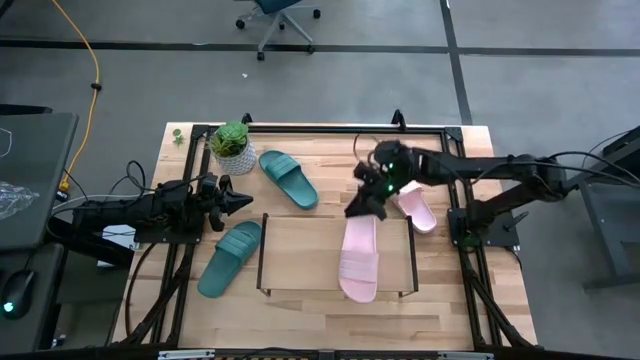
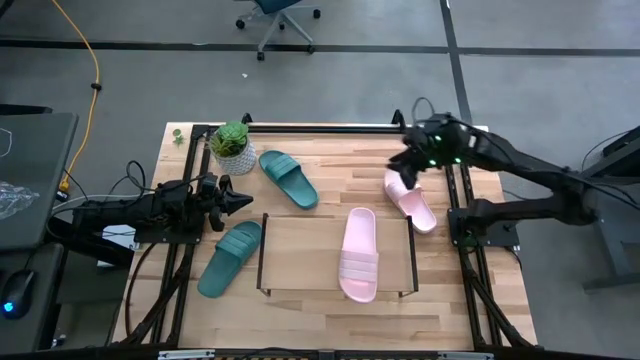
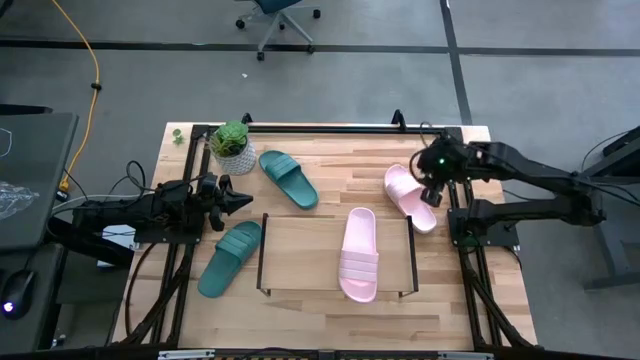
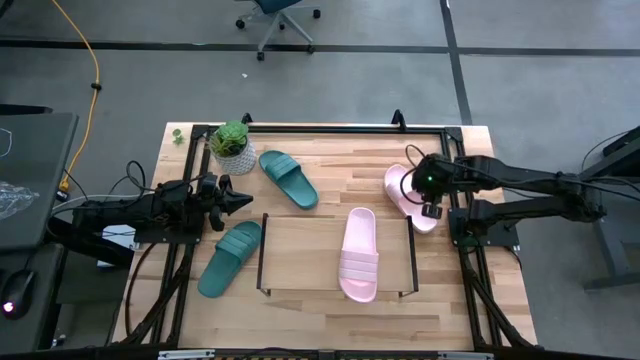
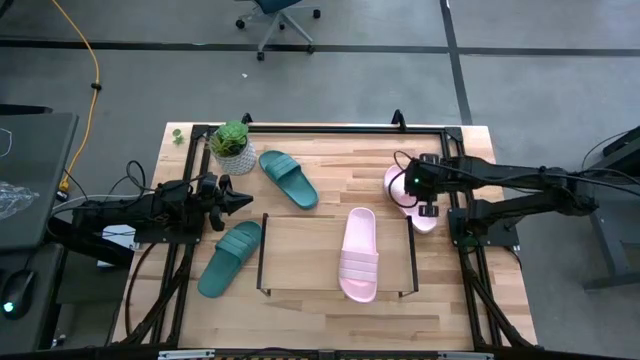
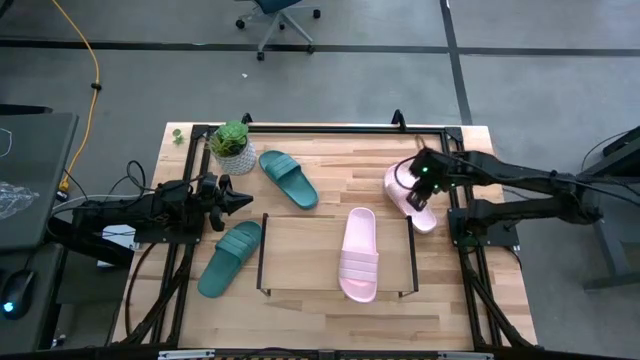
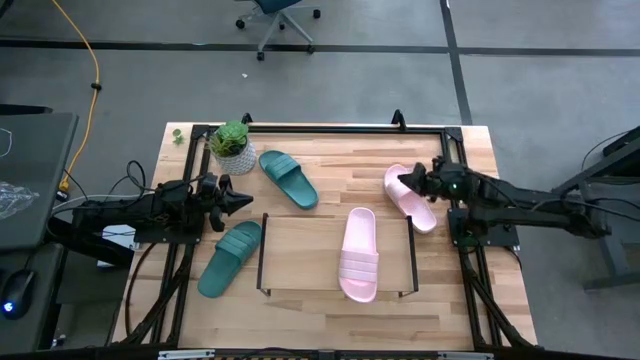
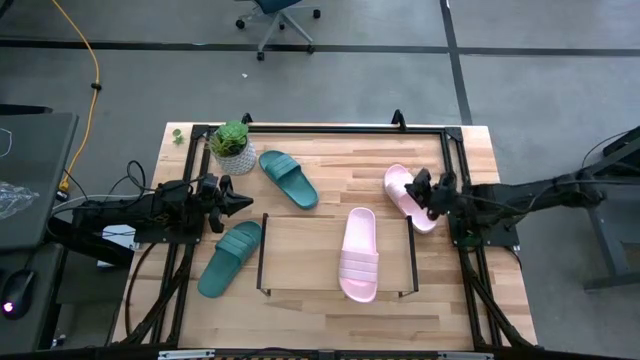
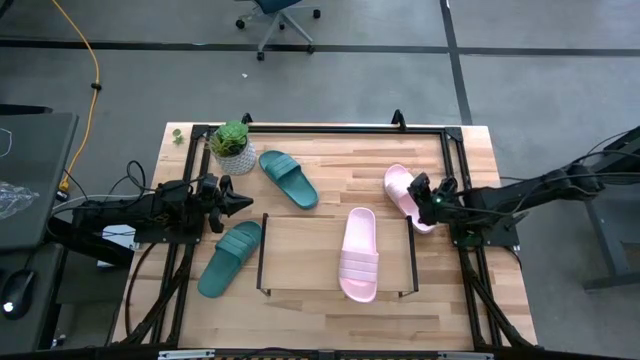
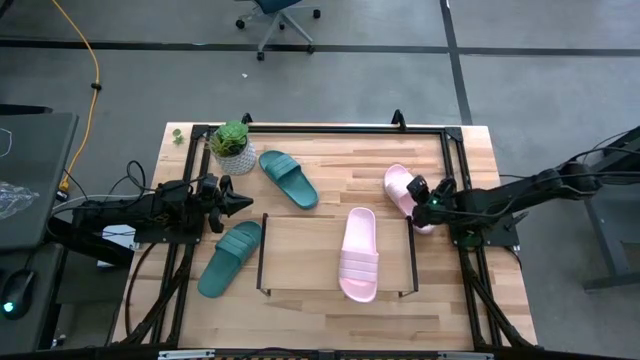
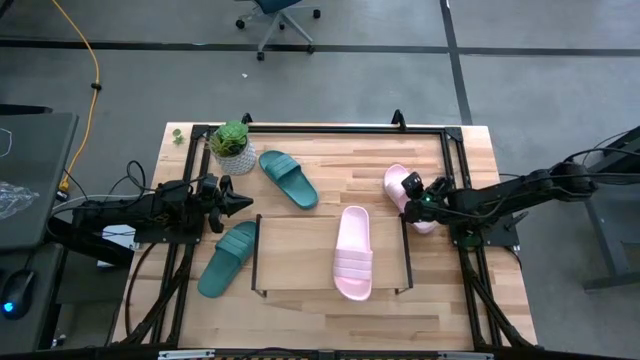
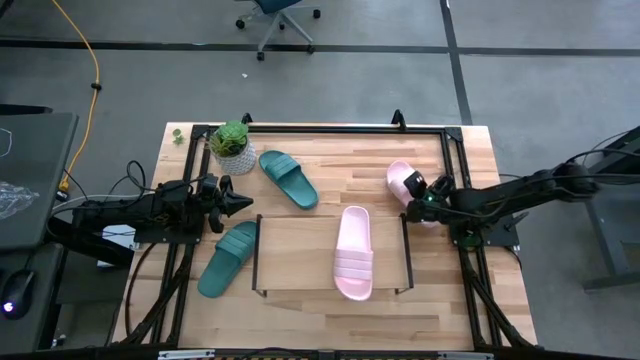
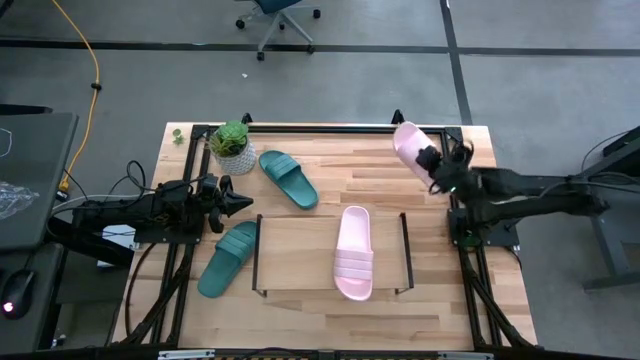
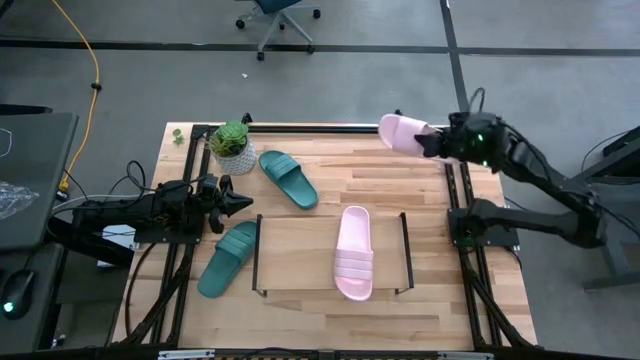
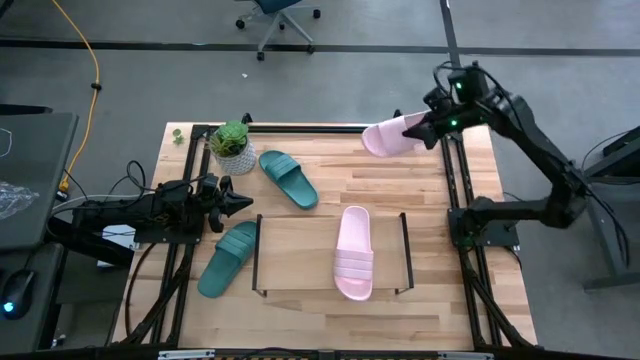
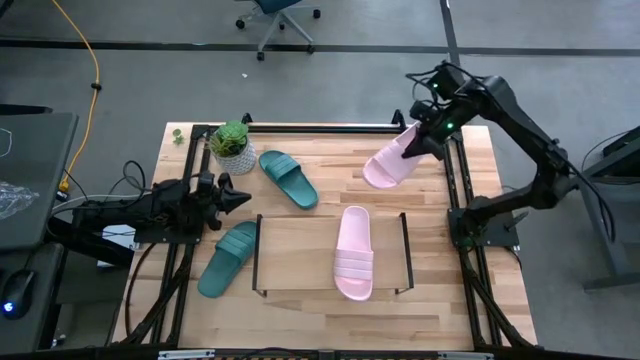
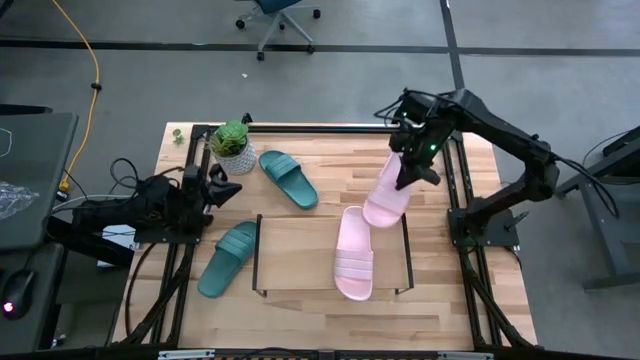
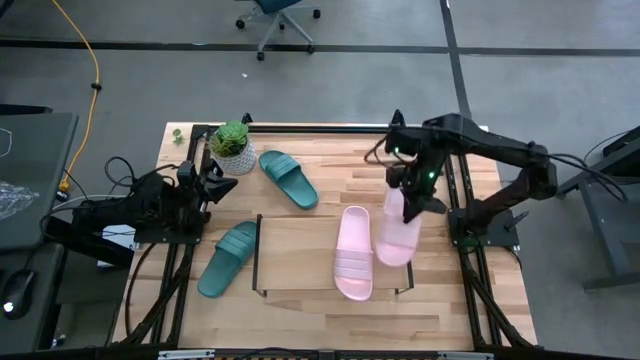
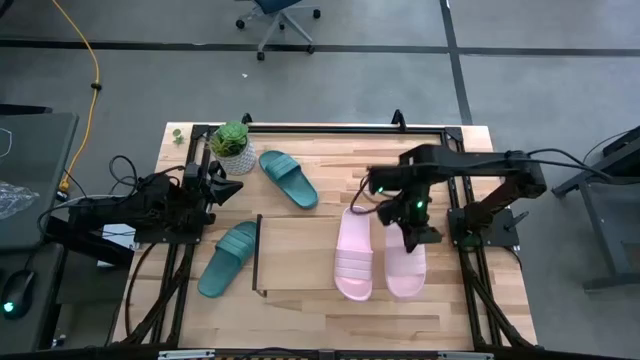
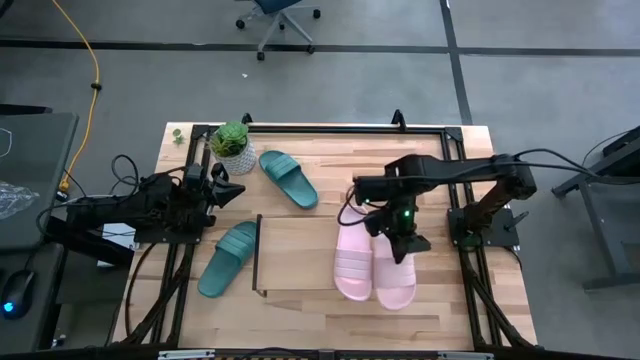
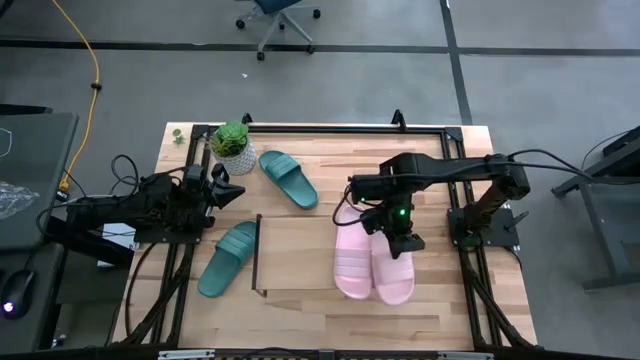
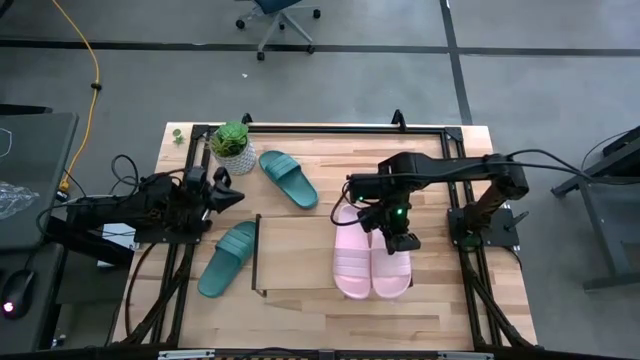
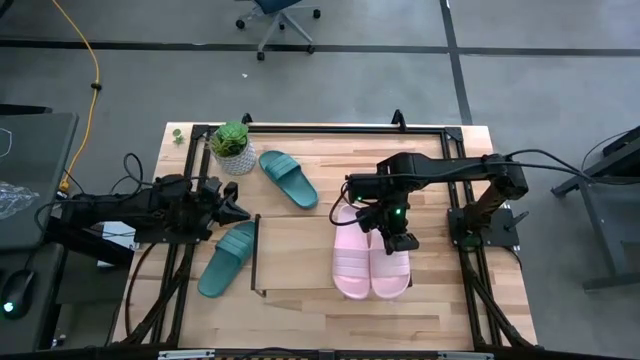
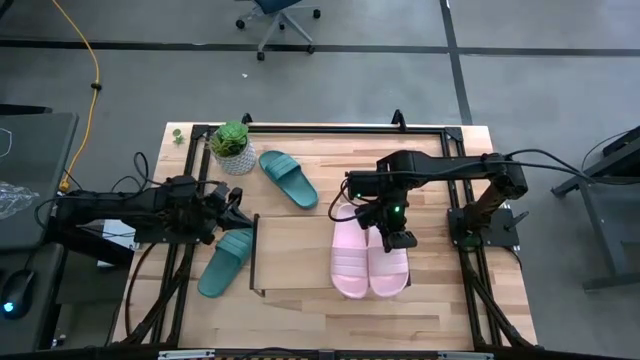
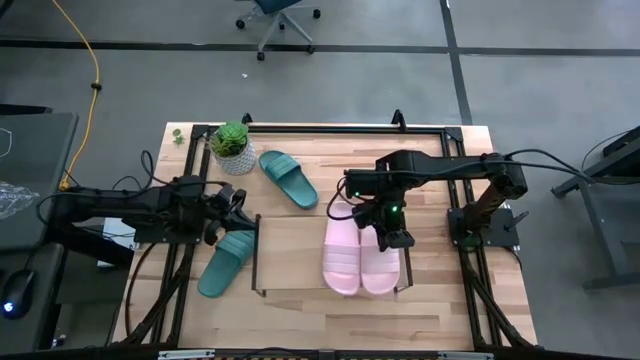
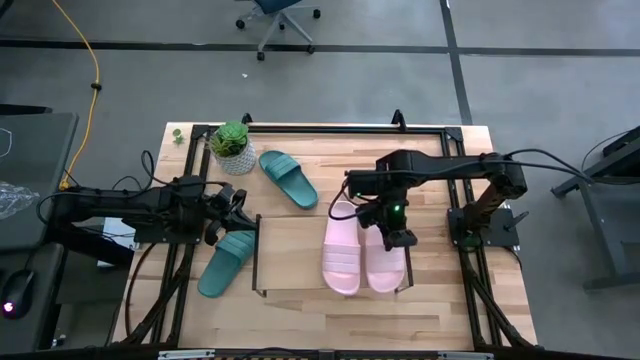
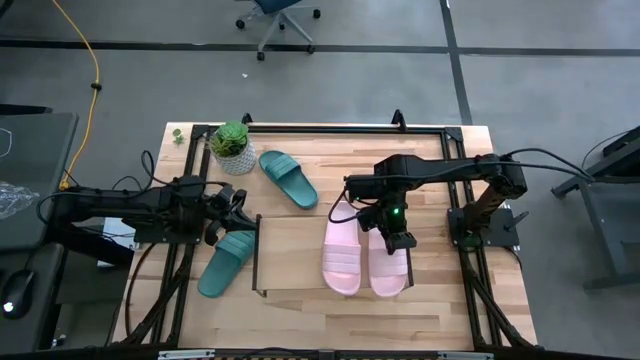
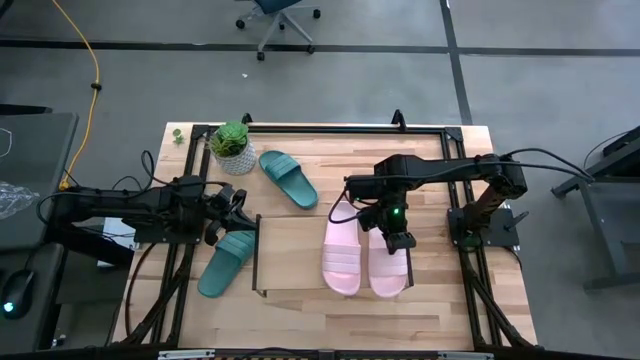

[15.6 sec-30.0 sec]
Task: Pick and place slides into the shelf
Put the pink slide on the shelf

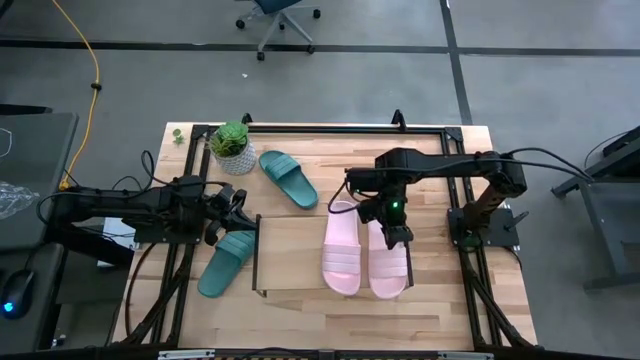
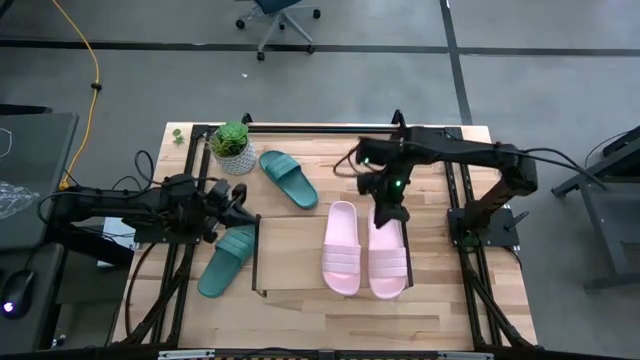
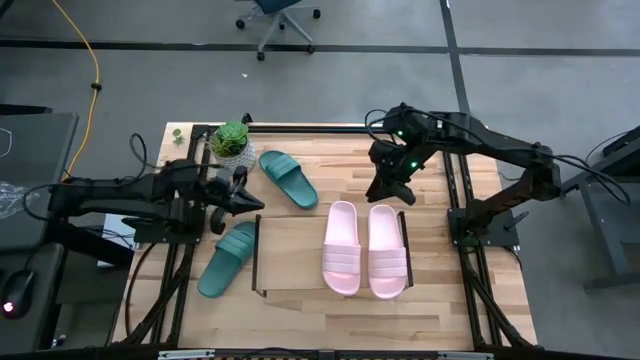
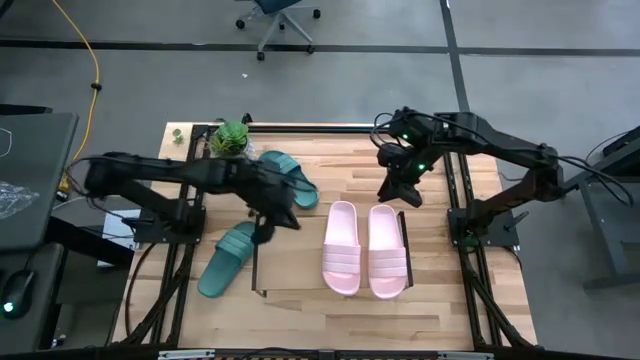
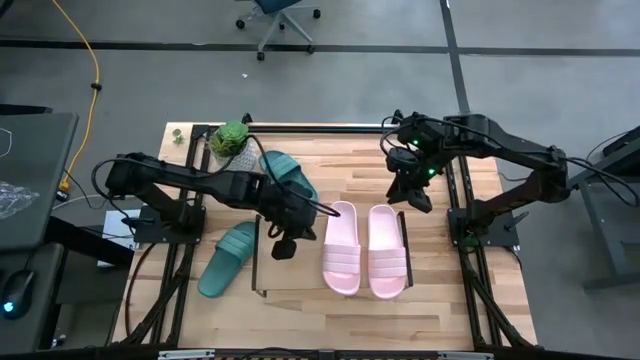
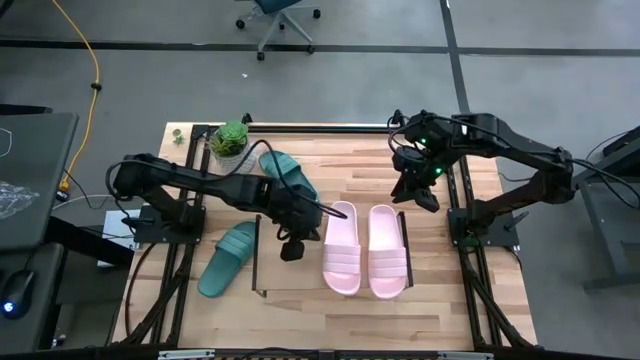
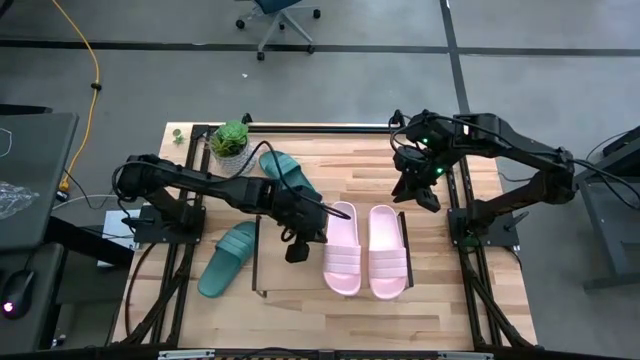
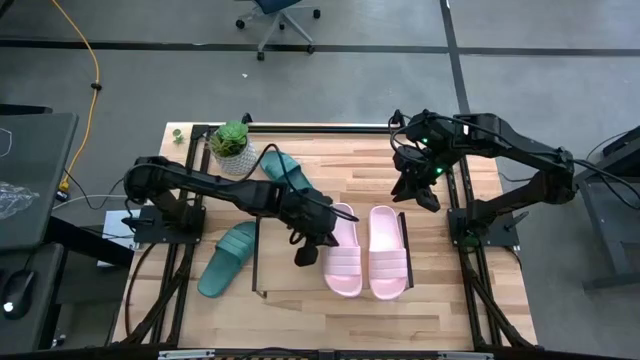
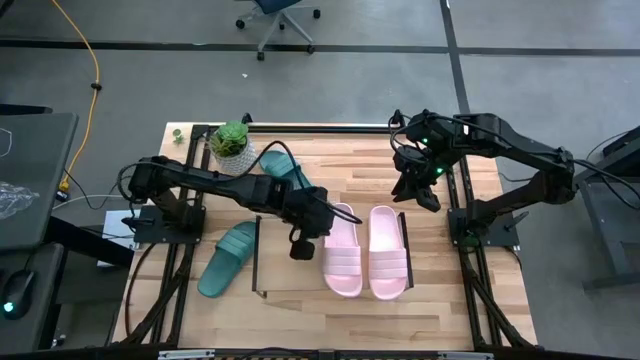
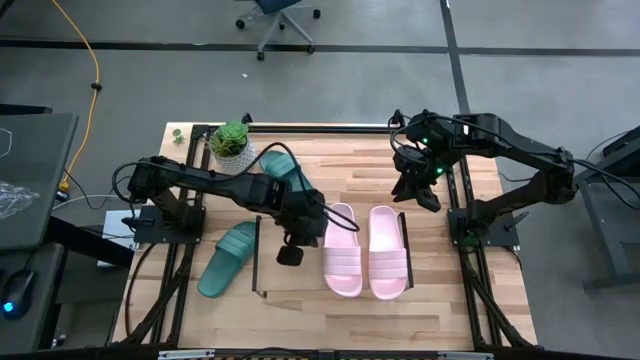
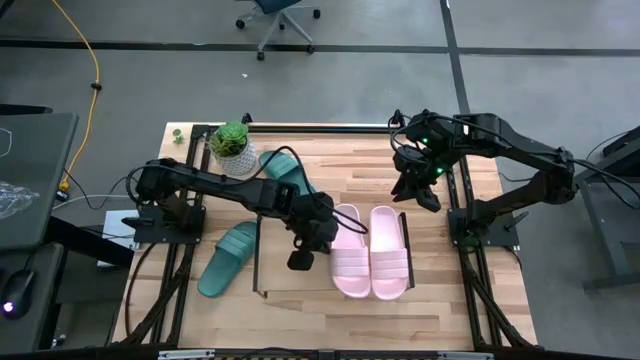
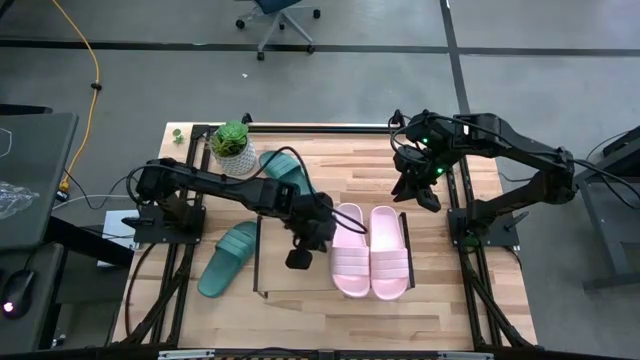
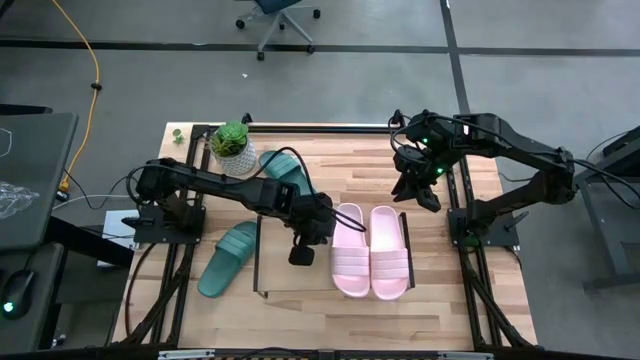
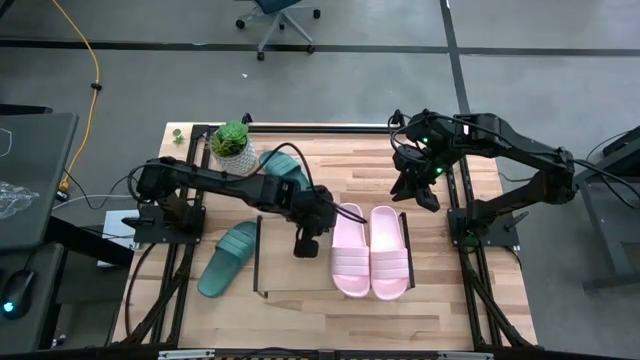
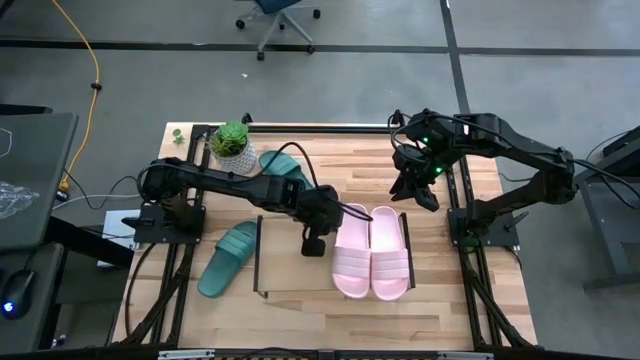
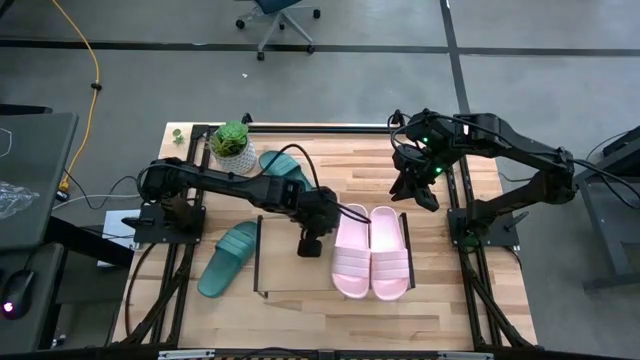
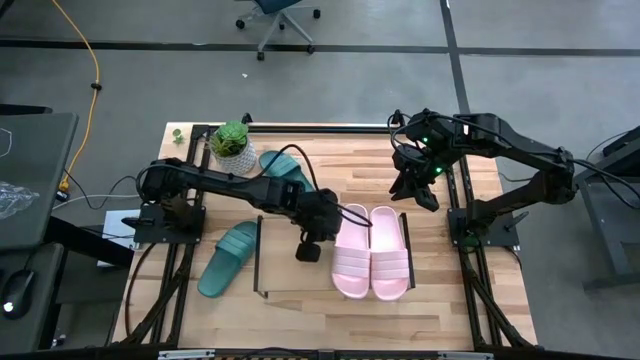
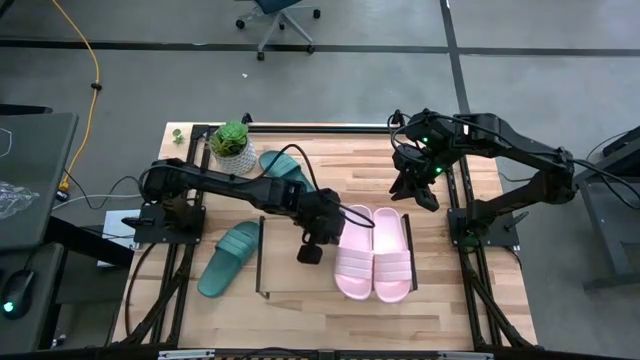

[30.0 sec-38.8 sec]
Adjust the left pink slide on the shelf
